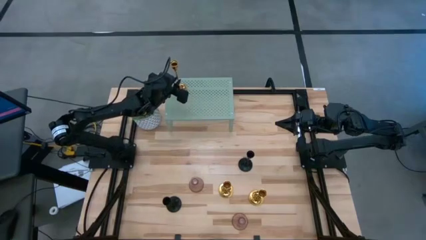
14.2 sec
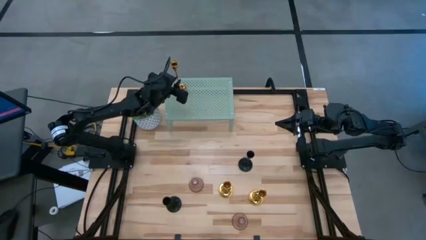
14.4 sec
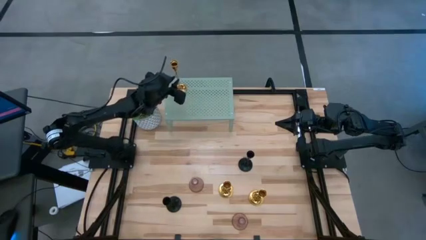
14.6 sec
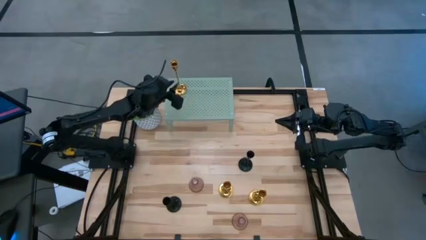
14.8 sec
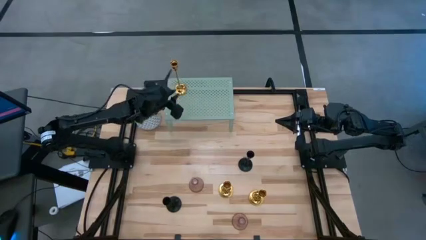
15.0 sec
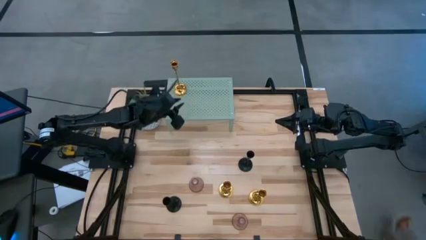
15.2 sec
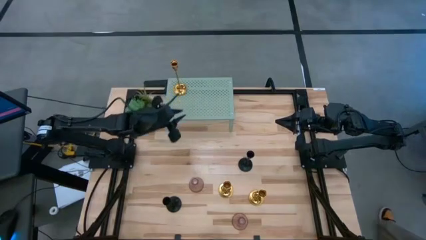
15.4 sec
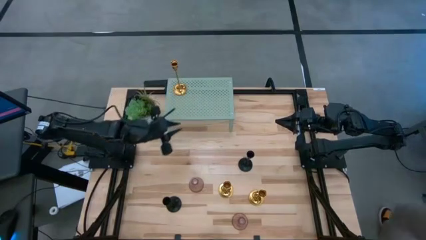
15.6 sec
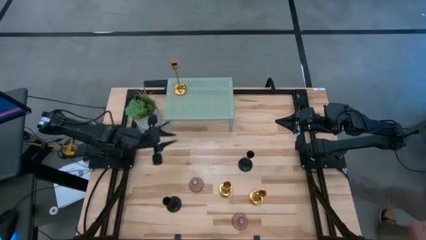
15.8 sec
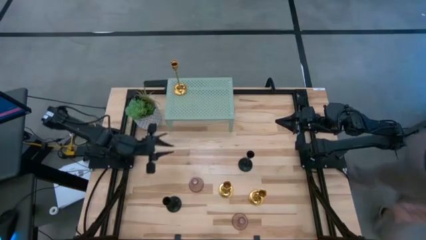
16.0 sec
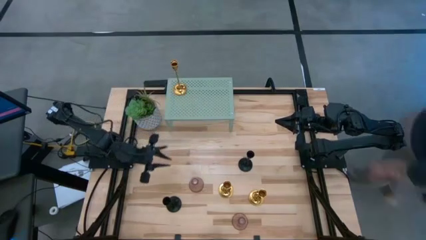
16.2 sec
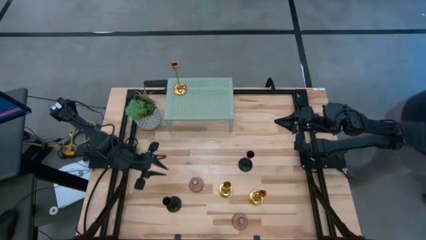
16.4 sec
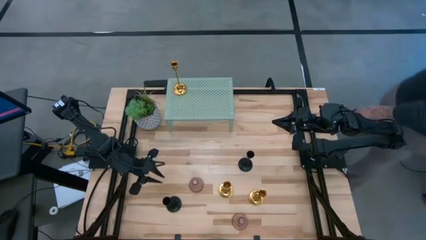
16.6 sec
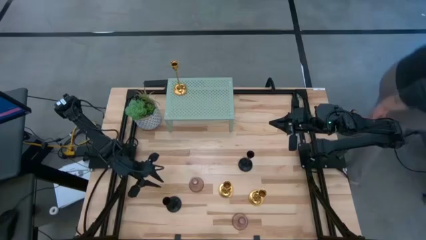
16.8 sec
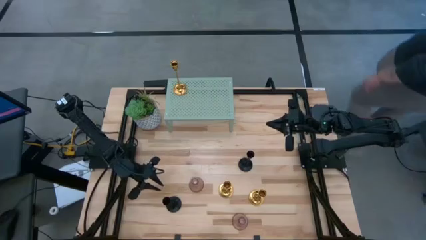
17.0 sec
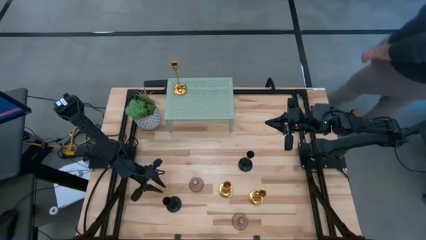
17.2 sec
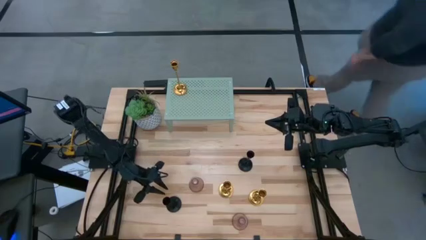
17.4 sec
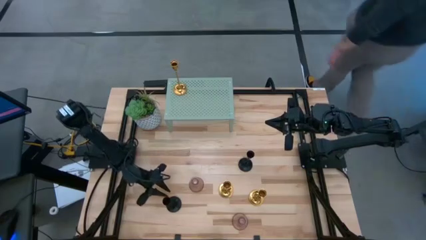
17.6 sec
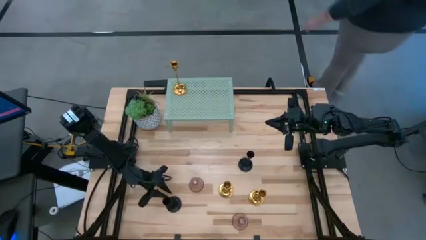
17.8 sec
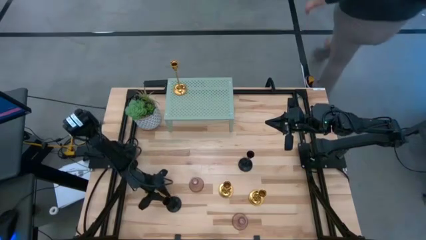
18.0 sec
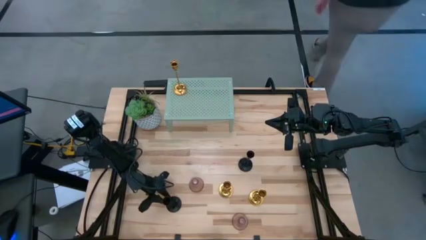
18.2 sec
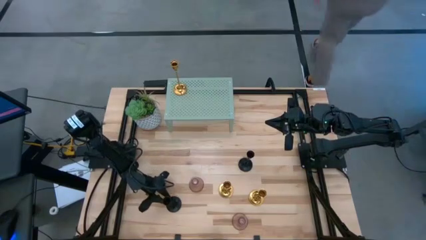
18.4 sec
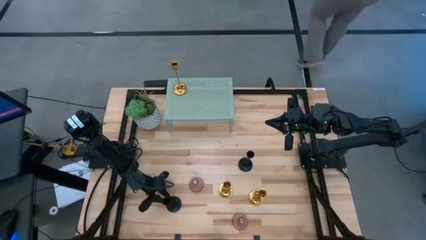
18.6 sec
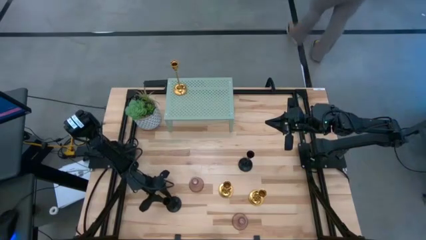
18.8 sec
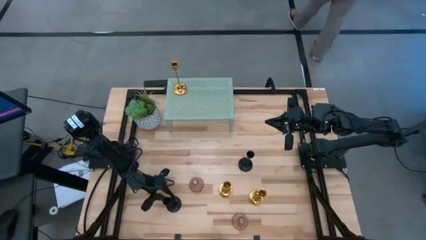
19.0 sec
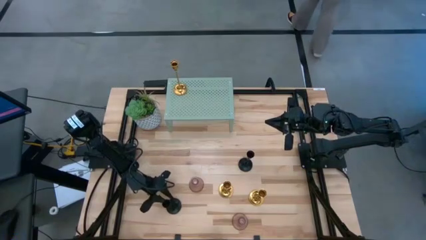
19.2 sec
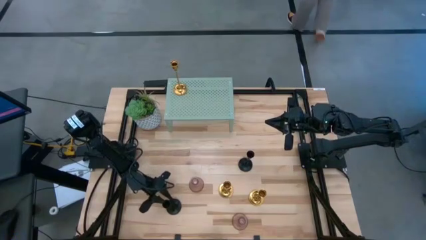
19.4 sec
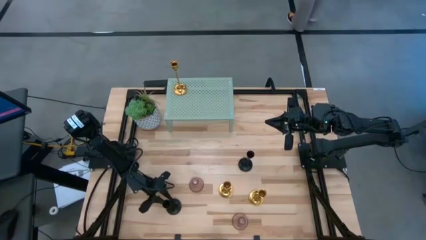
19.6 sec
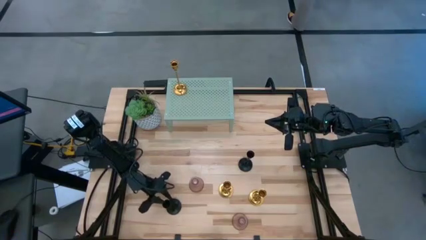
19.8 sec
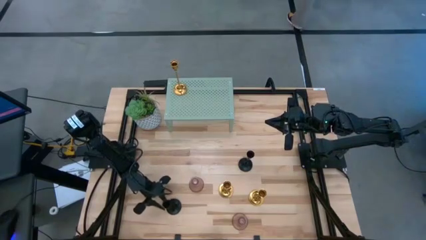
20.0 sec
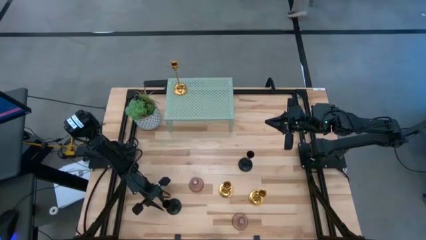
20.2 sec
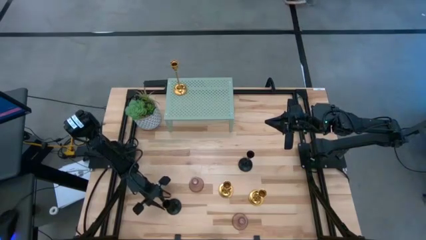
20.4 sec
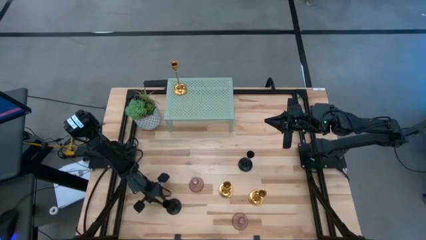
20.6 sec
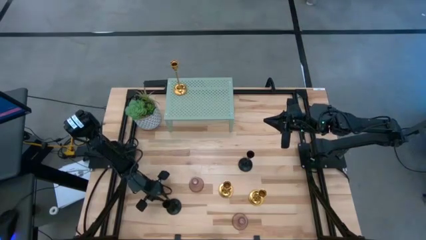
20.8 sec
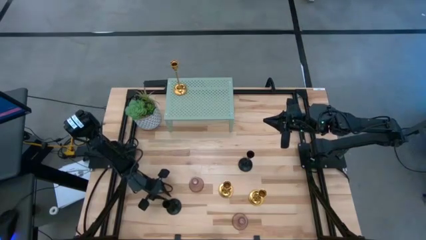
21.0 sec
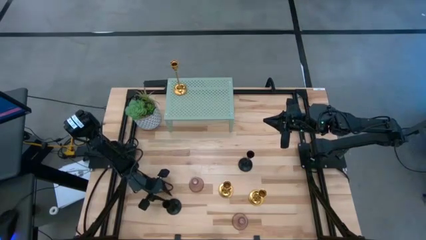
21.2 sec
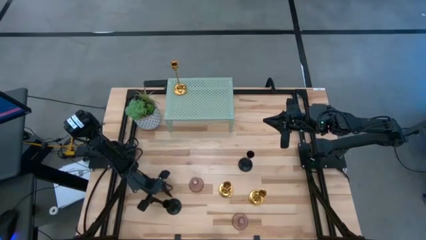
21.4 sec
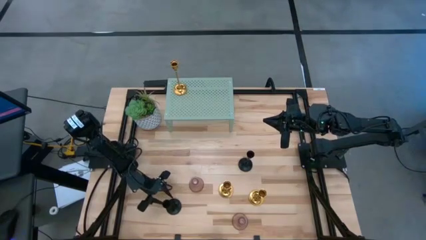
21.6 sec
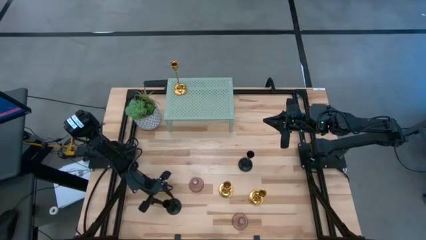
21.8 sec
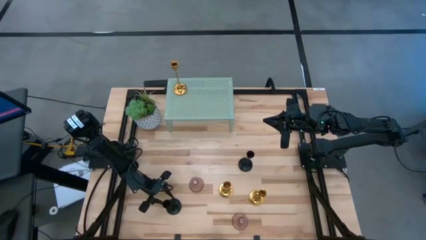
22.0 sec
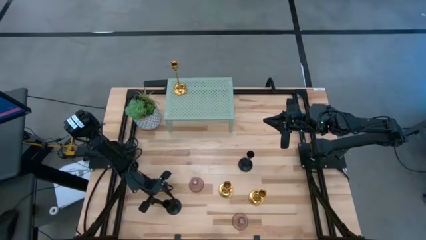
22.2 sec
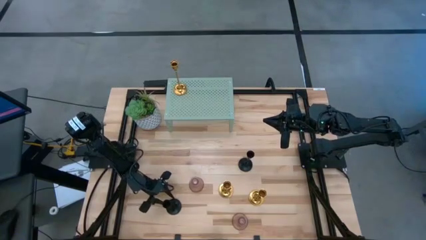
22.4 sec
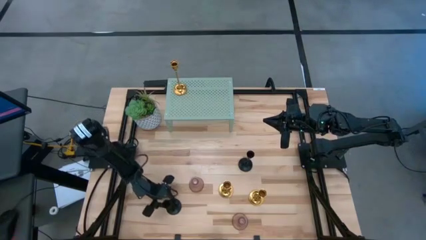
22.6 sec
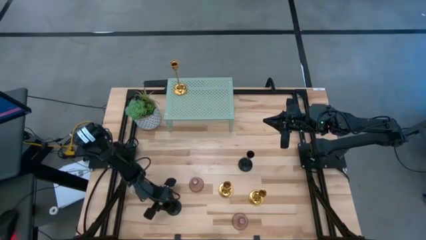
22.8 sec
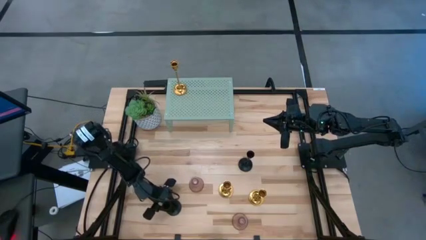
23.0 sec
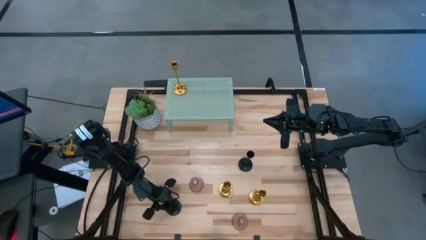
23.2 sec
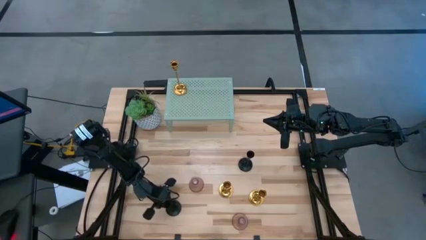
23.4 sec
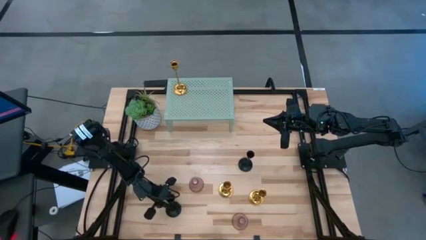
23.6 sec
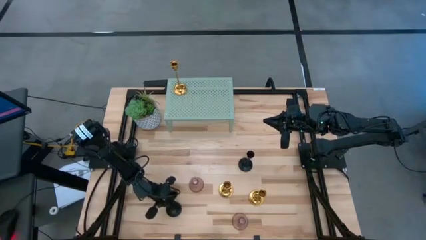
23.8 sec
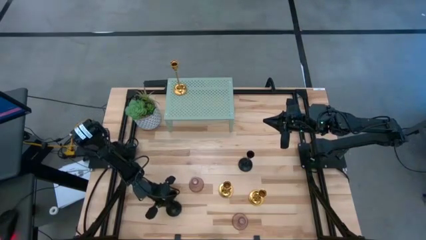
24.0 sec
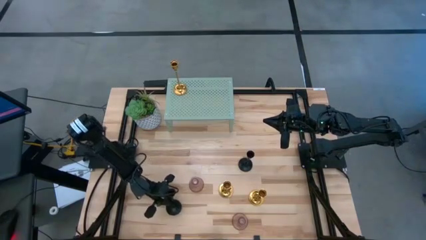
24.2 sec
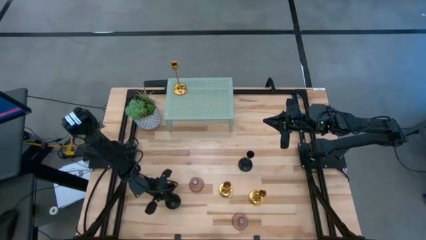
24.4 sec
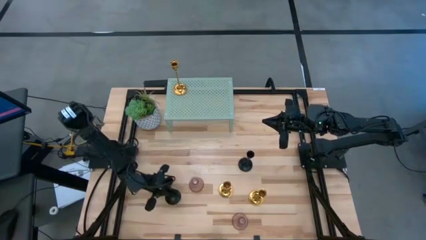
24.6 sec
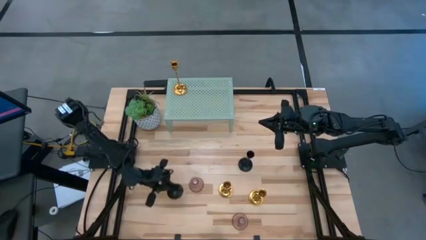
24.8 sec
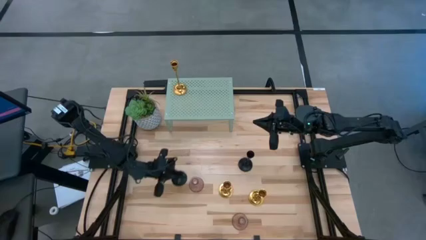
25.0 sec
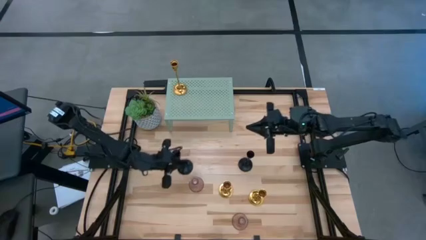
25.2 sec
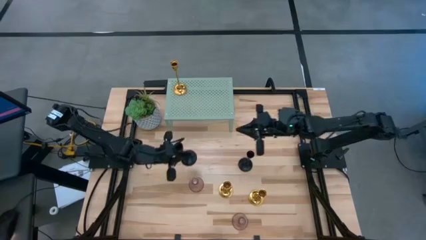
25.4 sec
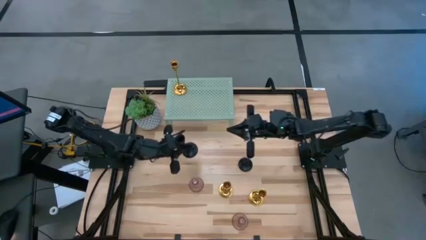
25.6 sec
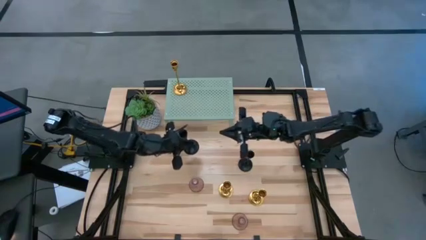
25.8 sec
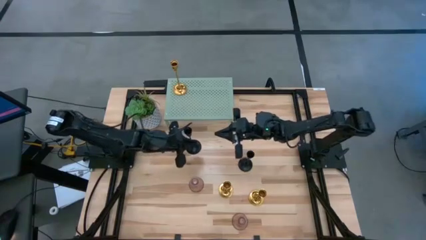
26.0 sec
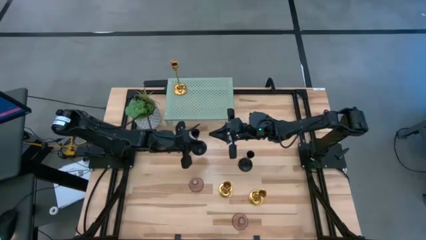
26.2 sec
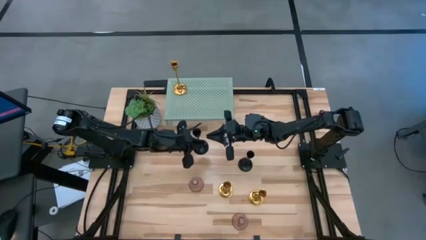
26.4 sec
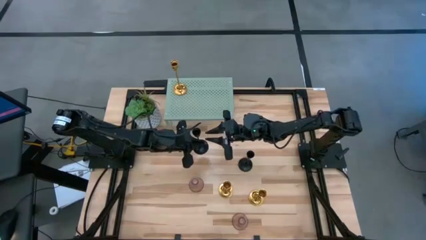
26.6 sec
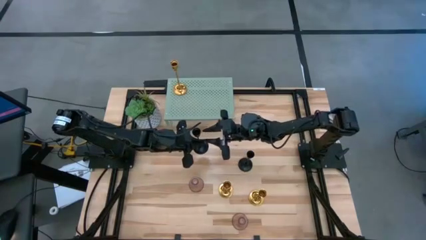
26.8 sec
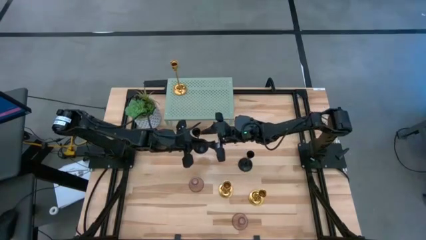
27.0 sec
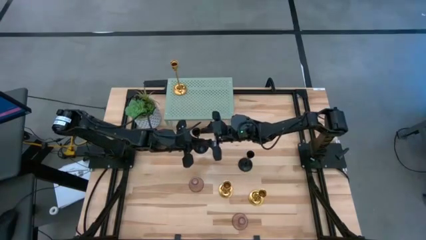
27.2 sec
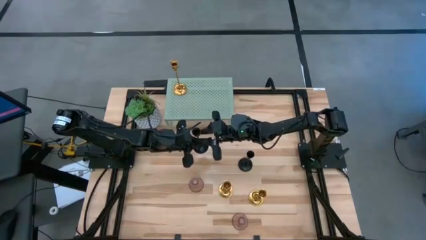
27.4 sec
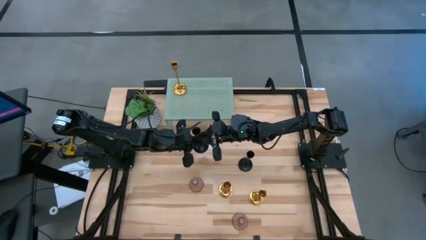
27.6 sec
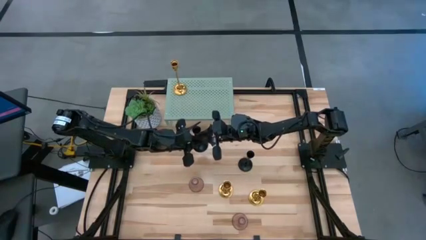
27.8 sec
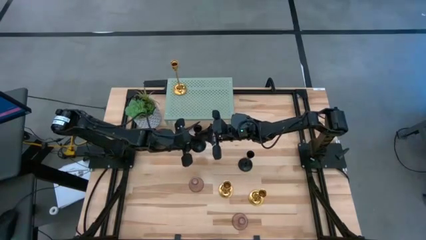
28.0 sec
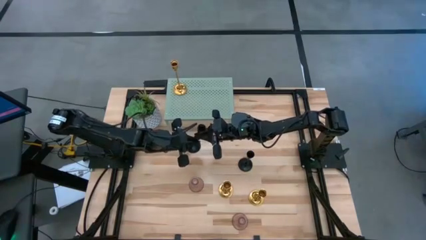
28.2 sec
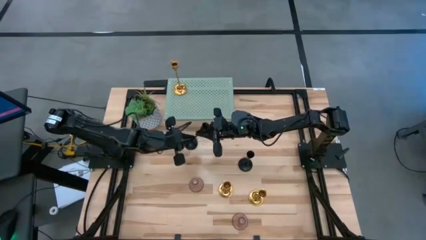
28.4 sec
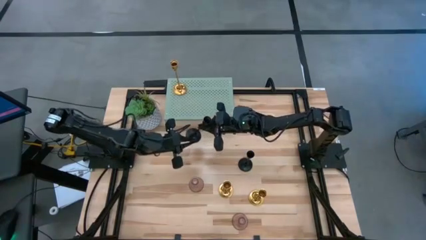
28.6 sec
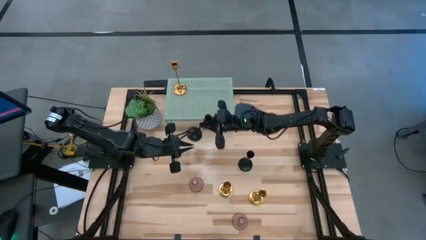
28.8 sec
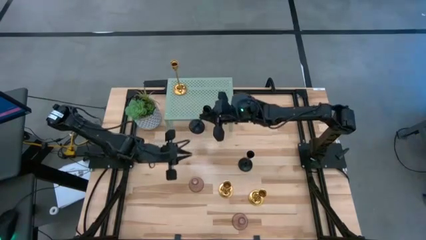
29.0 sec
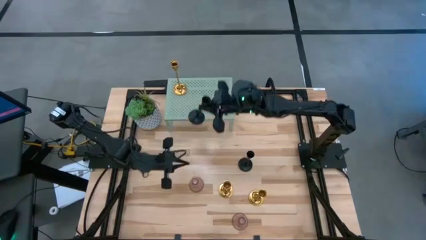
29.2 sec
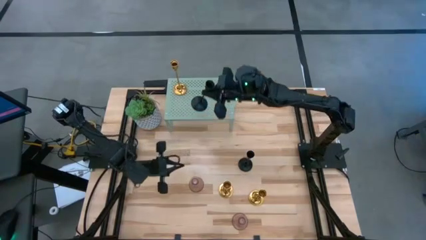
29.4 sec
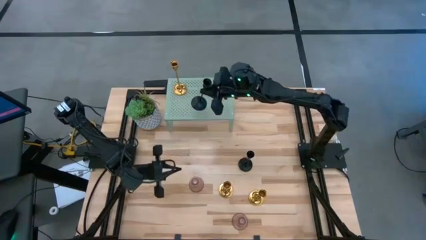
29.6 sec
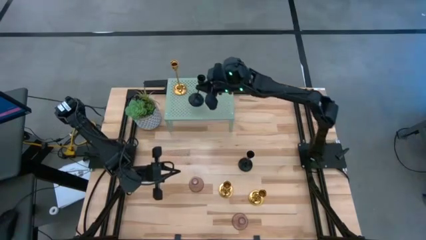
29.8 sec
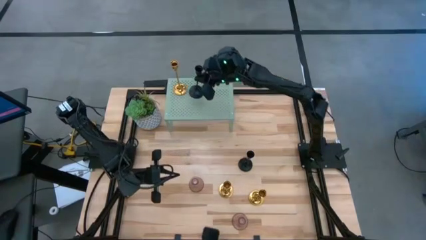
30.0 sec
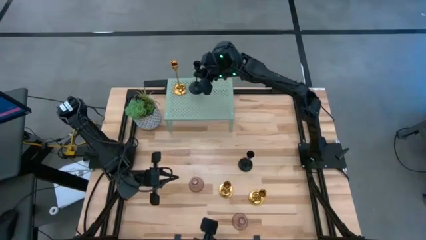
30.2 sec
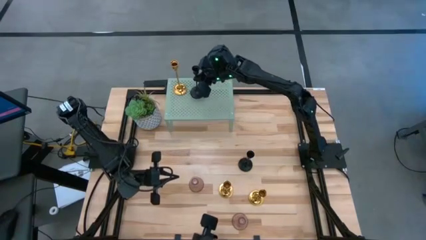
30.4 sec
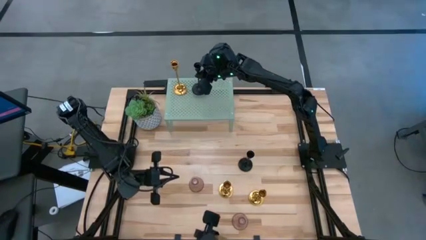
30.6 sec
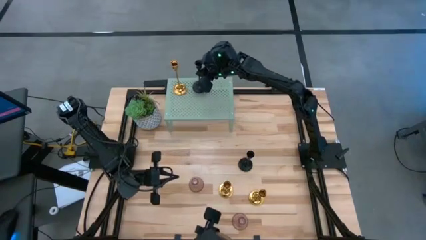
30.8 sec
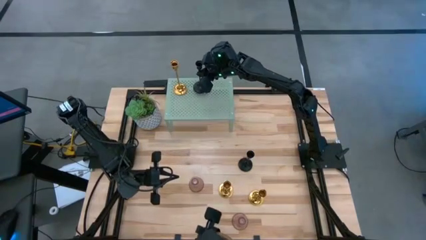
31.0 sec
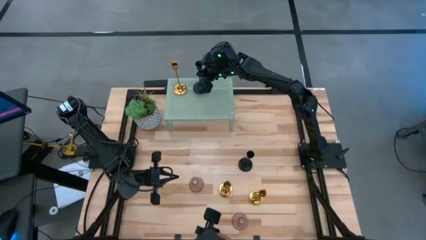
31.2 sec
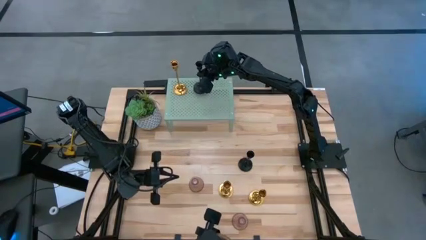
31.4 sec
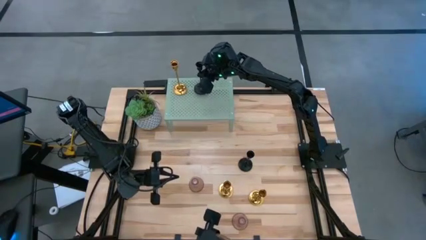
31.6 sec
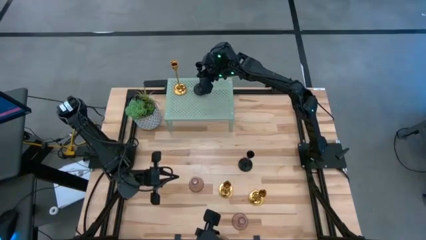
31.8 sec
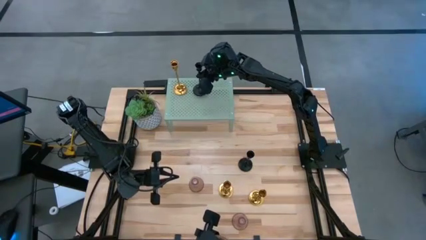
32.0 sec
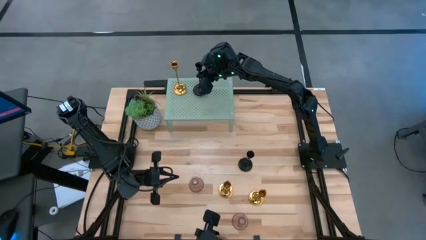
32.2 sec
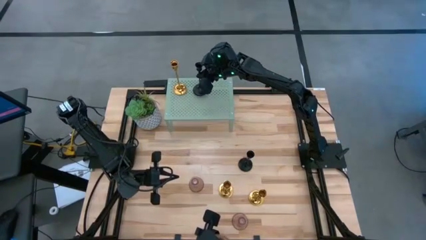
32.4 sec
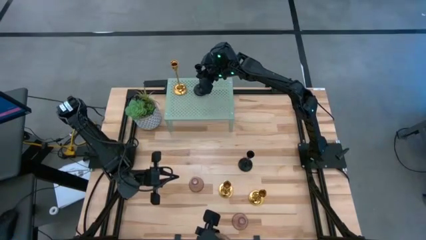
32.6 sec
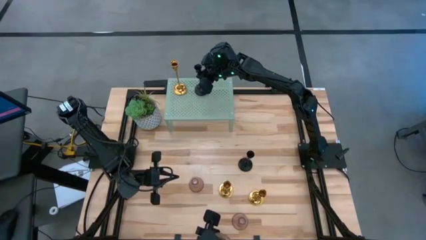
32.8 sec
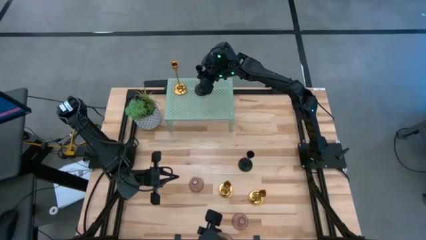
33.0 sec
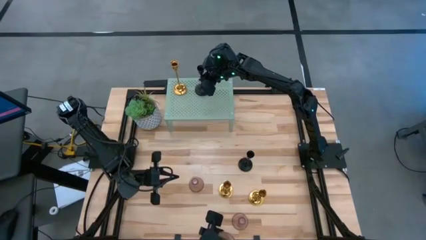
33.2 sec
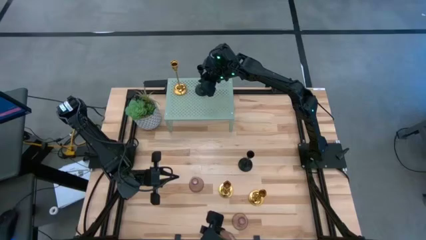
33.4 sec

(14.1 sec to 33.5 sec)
Task: Pick & Place candle stick holders
Put the bottom left black candle holder on the shelf
